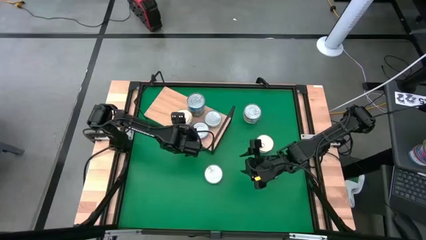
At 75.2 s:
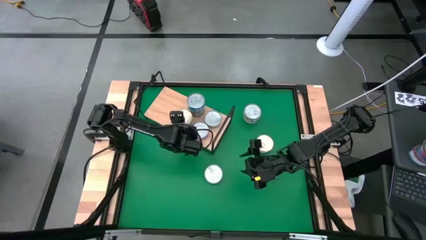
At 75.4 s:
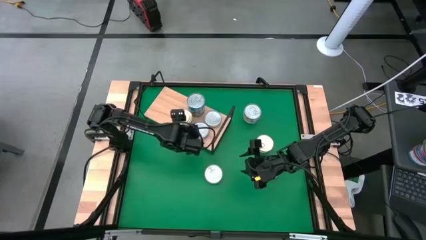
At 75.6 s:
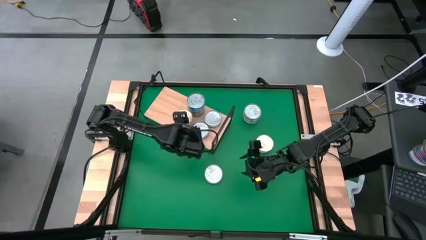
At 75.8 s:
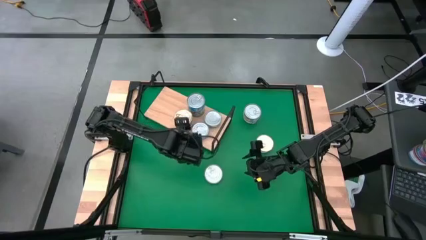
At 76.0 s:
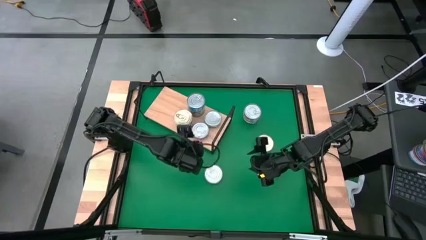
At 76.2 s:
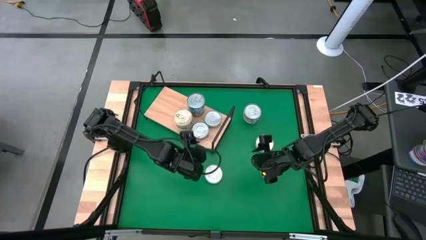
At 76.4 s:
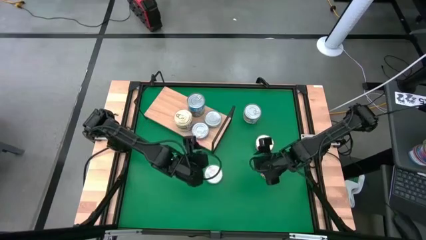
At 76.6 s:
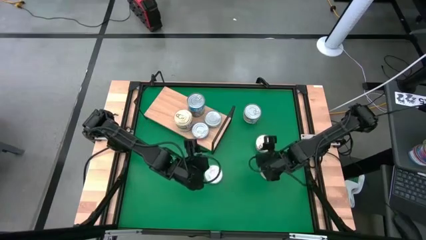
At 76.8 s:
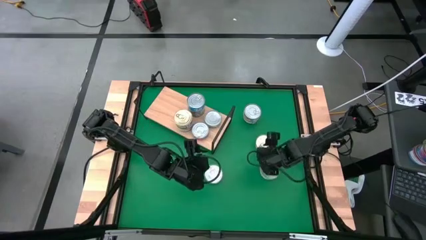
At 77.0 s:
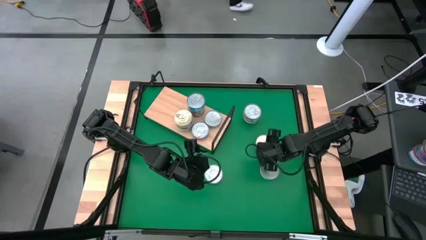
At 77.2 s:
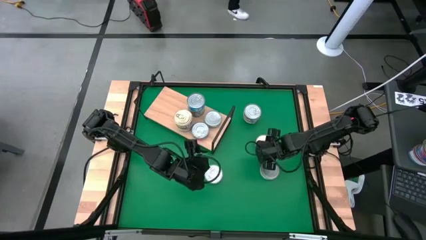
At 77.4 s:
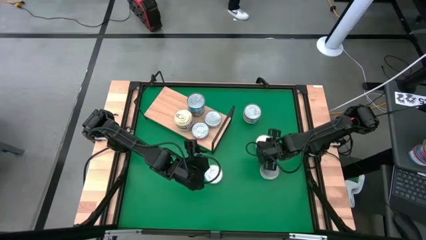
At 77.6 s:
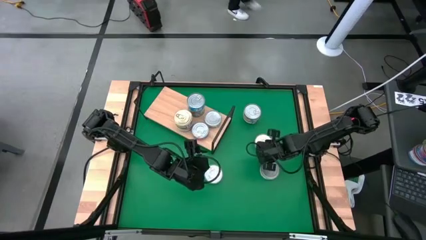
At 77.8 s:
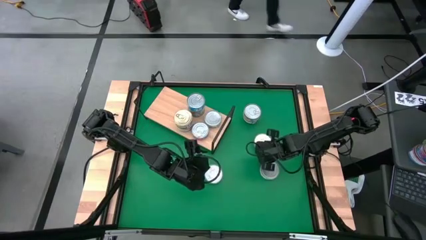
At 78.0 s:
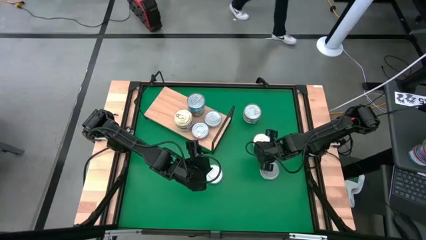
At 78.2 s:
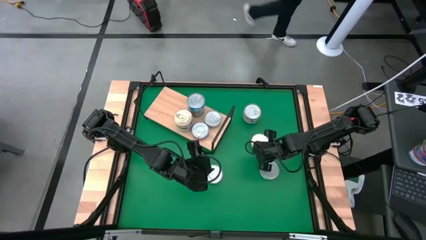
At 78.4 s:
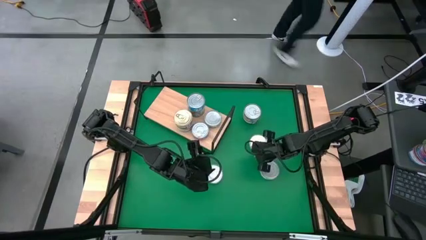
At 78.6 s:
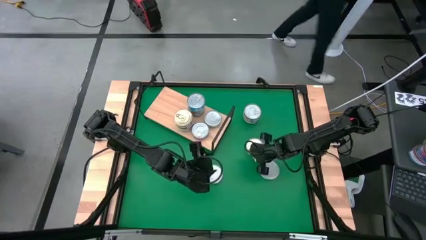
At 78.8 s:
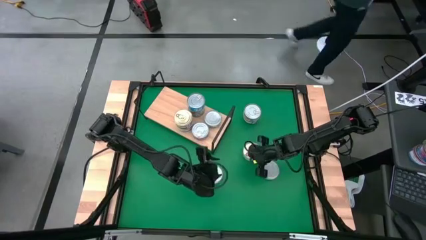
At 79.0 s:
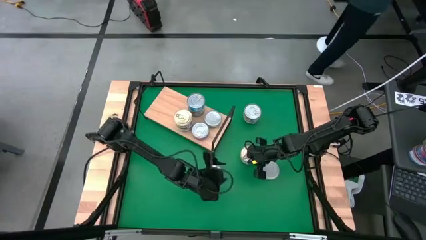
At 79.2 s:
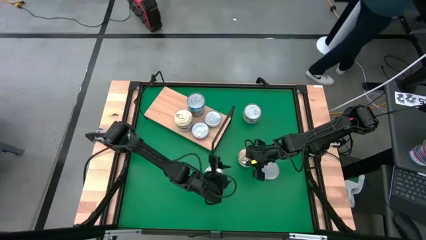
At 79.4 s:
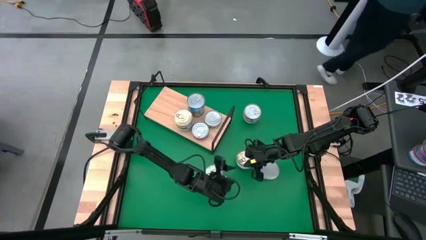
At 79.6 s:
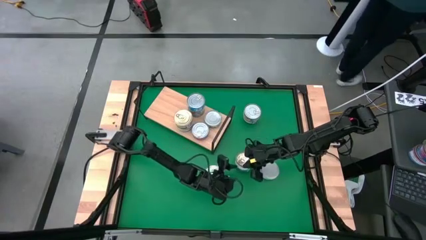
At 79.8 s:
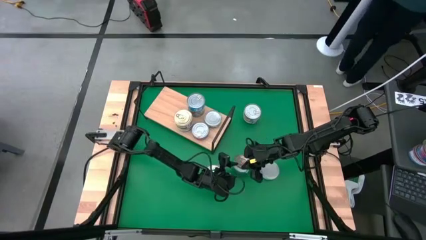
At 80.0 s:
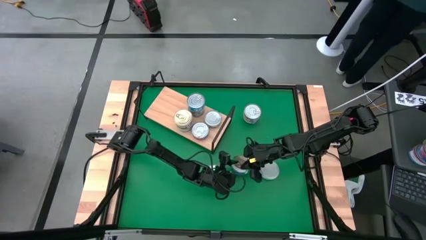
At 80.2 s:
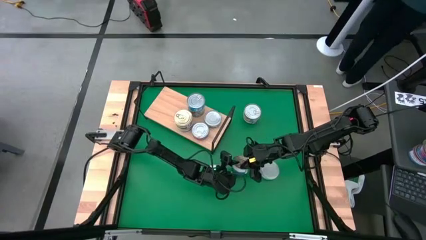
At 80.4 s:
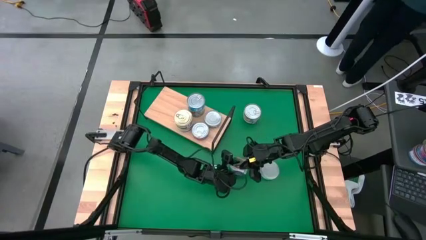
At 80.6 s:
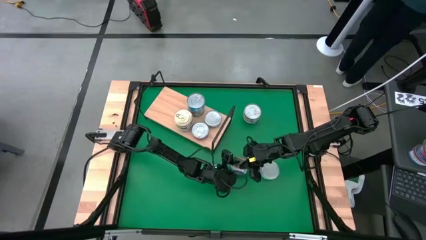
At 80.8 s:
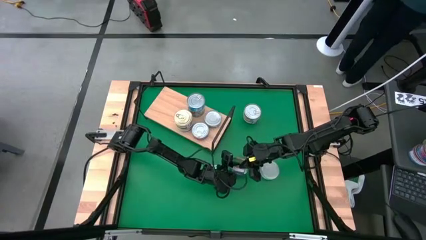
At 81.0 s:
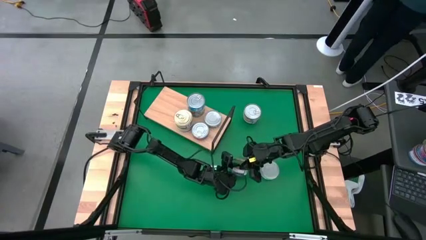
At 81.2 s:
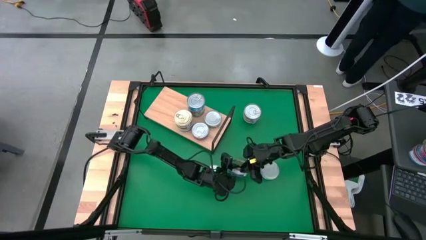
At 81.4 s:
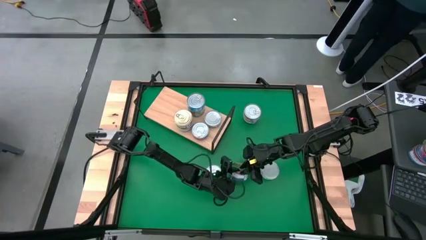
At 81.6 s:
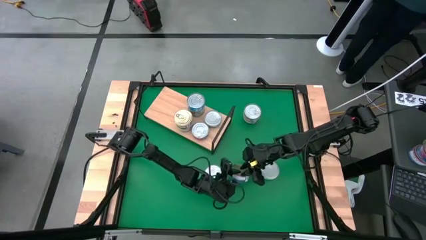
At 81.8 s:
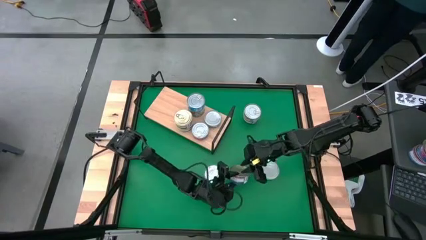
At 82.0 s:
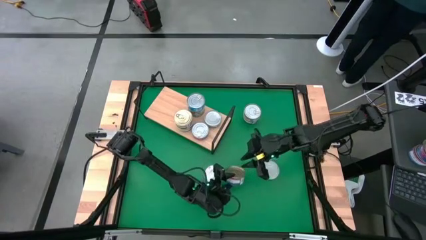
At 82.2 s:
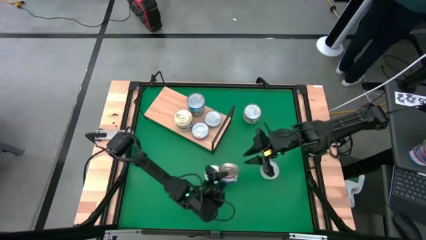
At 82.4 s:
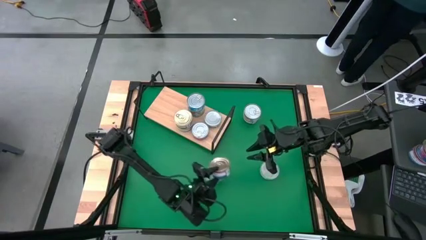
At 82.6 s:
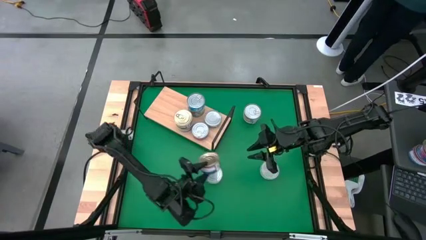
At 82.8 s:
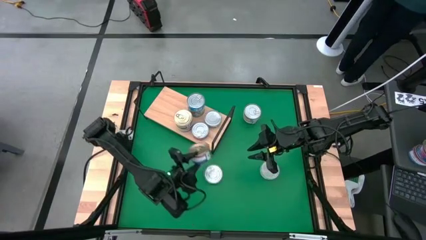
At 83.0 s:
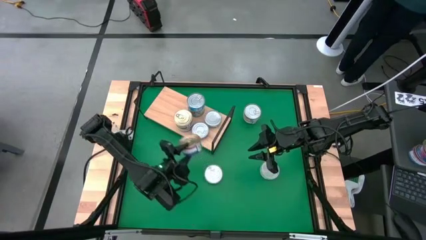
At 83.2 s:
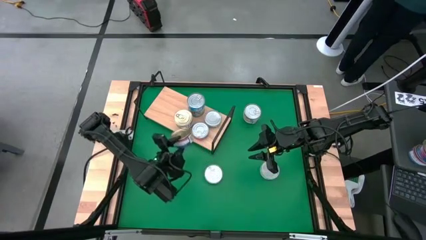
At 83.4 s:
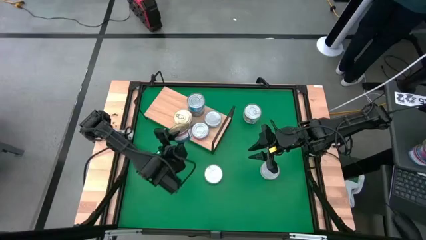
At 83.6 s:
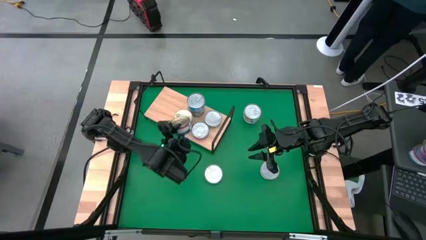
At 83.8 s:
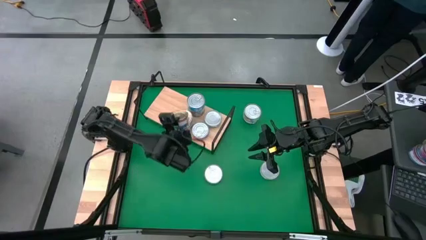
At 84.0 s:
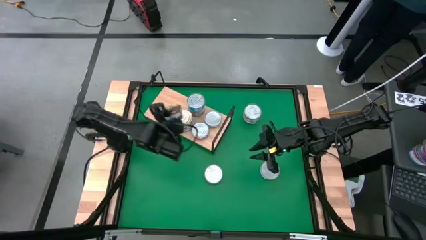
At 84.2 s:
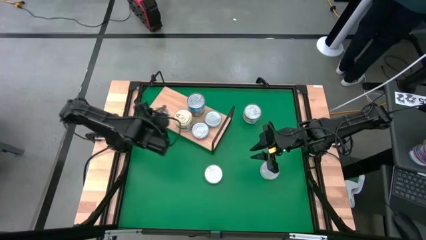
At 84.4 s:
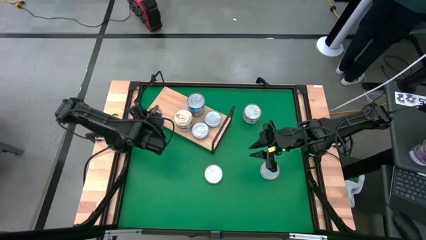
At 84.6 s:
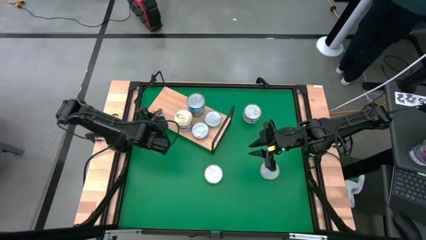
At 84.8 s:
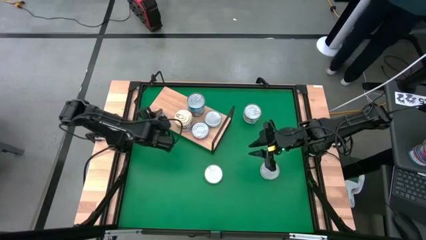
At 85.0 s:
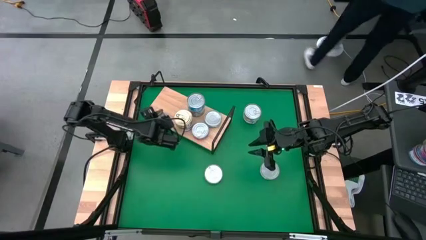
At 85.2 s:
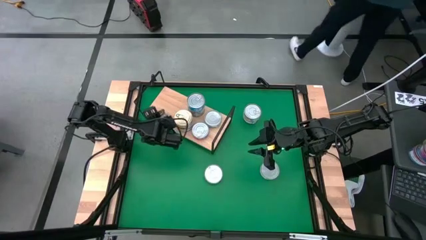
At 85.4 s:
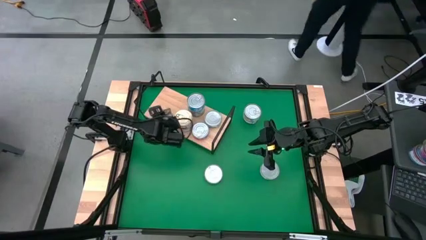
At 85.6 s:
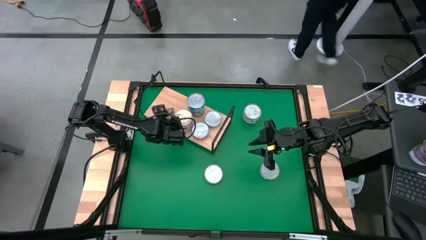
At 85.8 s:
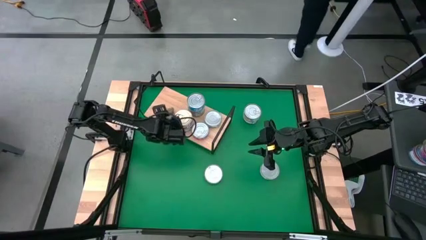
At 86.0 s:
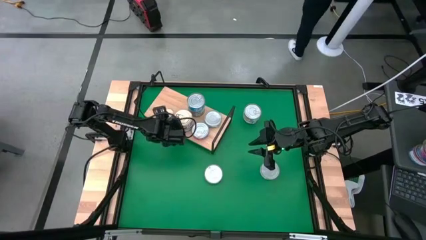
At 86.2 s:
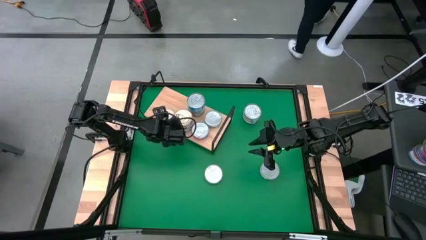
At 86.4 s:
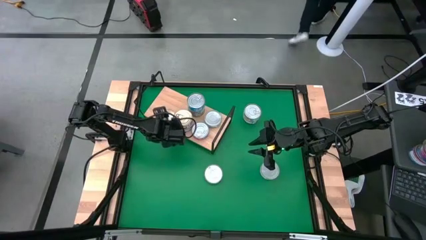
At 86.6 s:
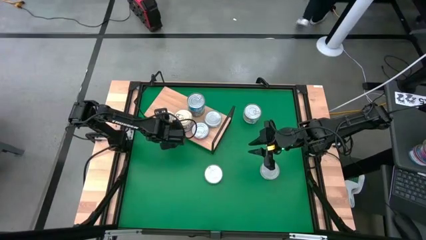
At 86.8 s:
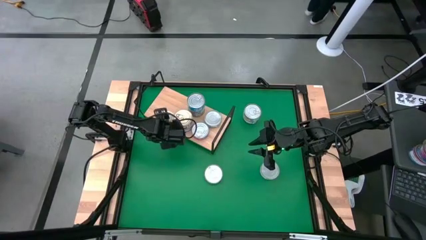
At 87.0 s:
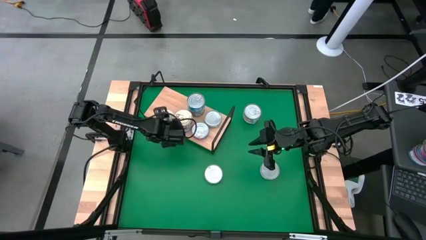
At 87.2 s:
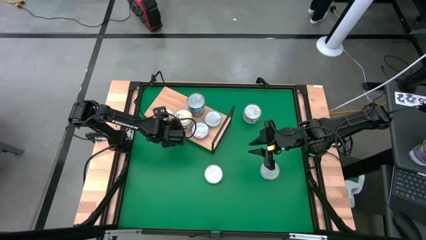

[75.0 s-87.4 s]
Task: Stack canned seafood by type on shelf
Put the blue tuna can on the shelf
